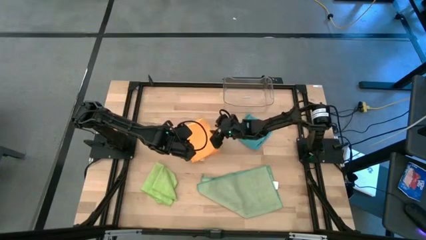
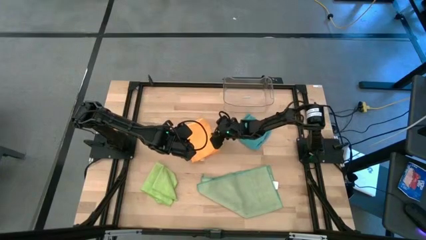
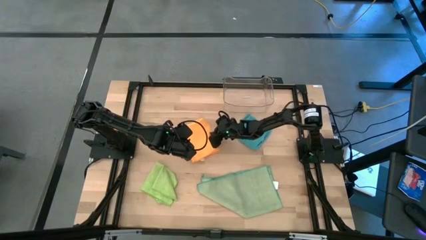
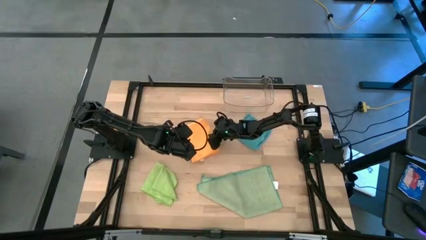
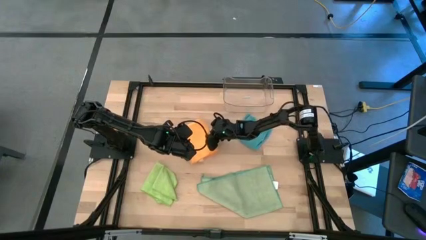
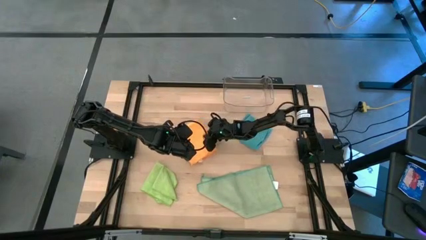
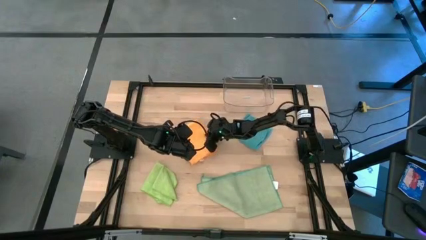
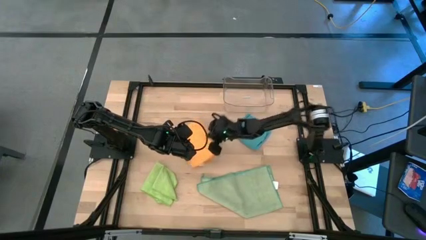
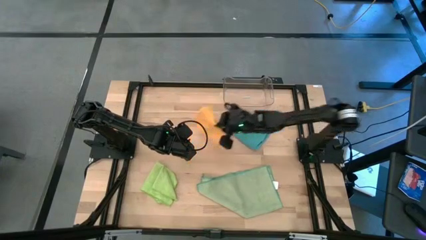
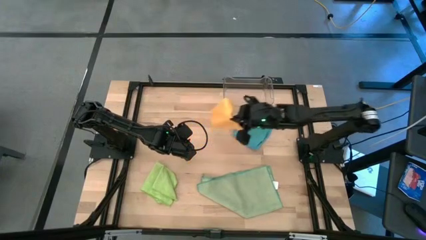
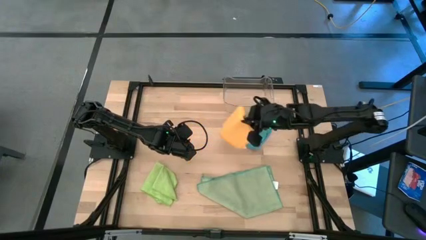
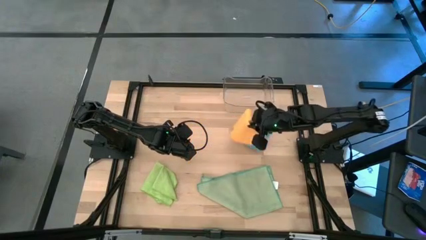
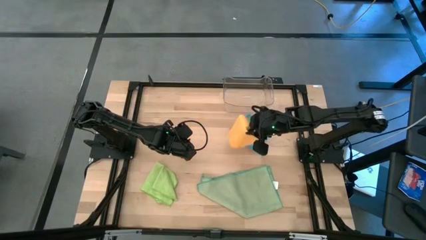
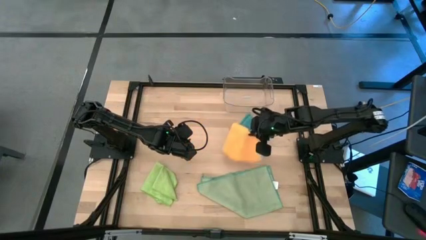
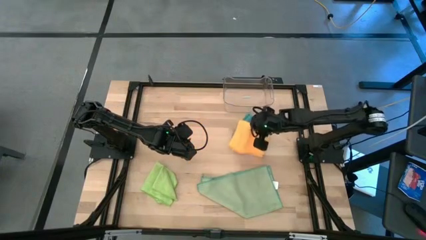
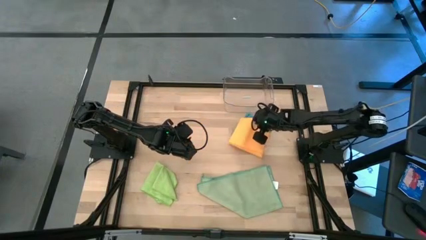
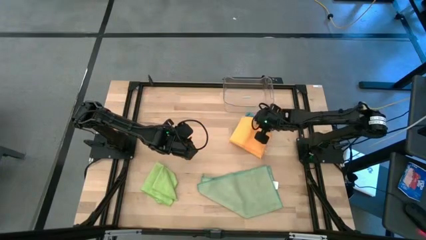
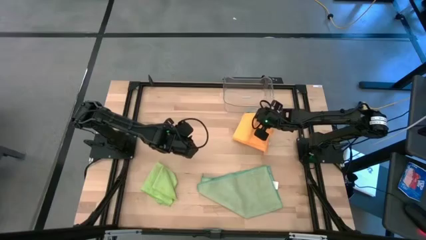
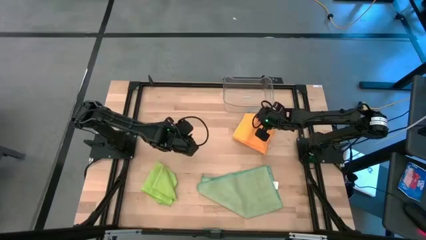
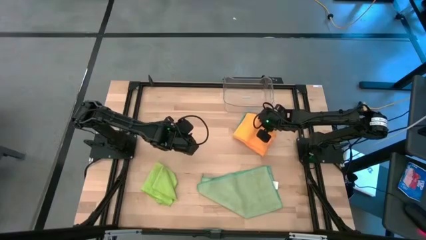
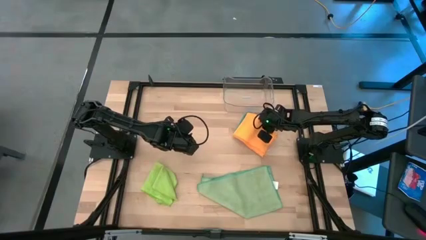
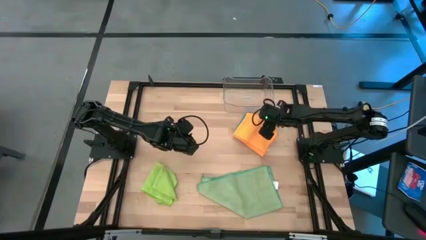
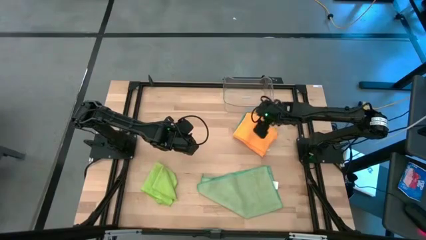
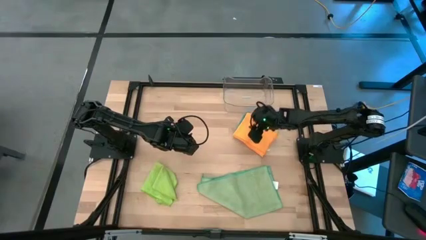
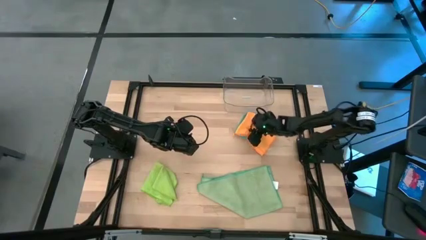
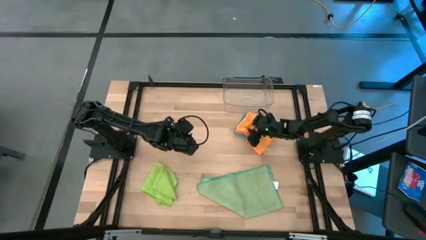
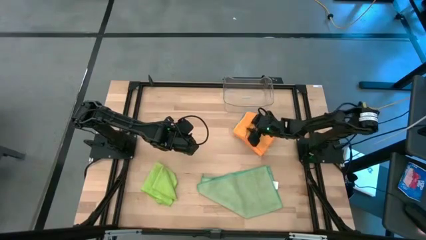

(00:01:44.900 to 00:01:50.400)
Task: Fold microfiber towels
Stack the folded orange microfiber cloth on top of the folded blue microfiber cloth

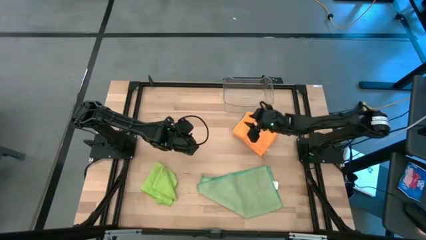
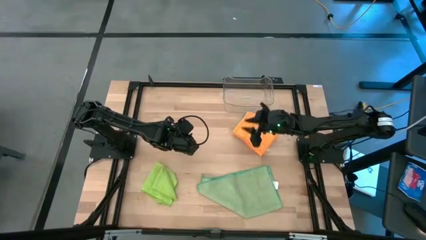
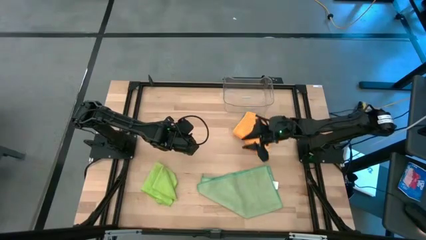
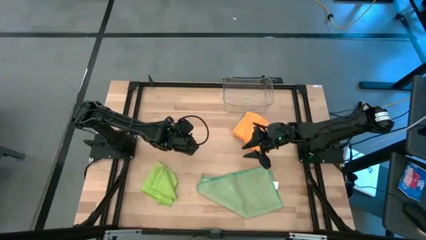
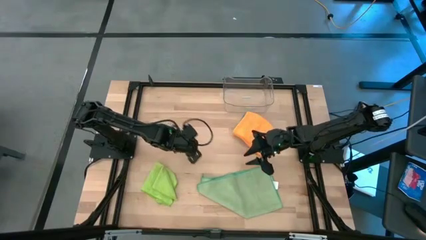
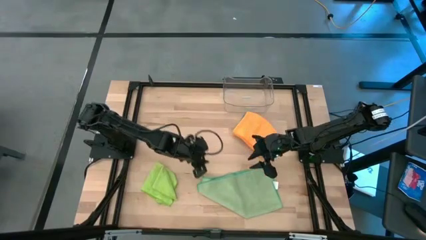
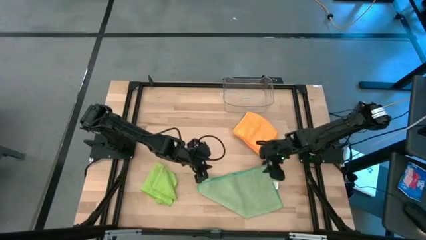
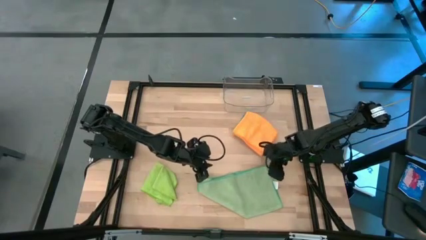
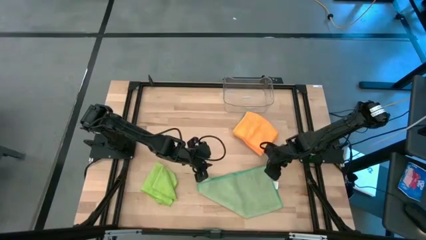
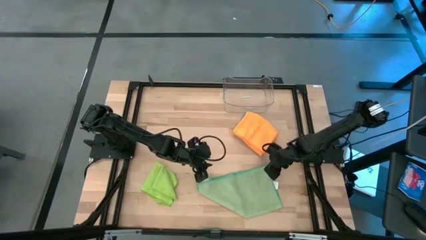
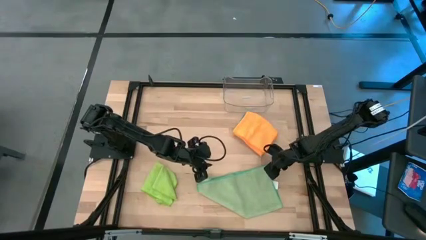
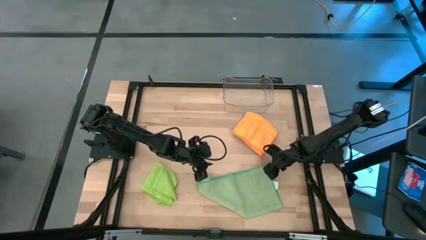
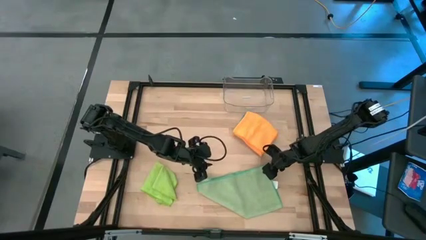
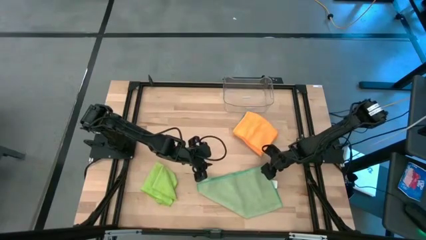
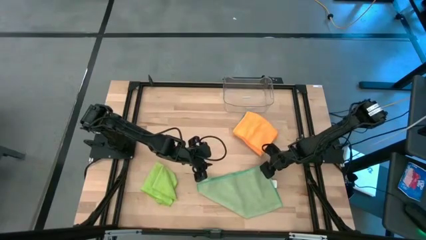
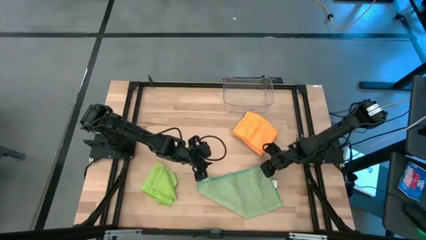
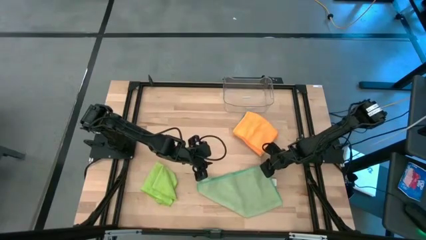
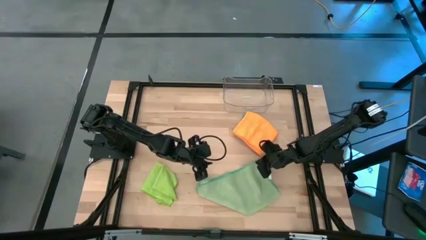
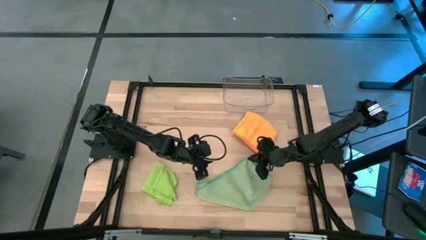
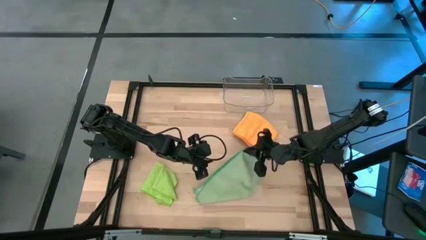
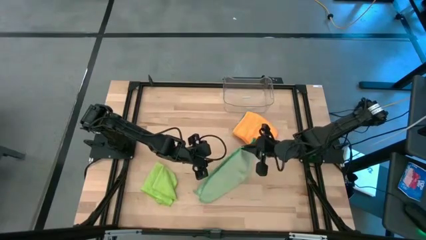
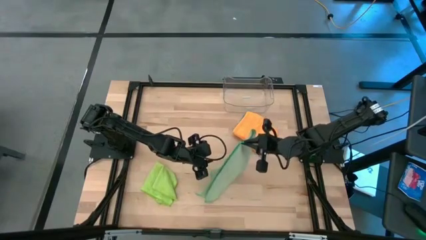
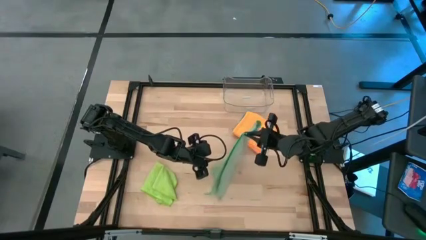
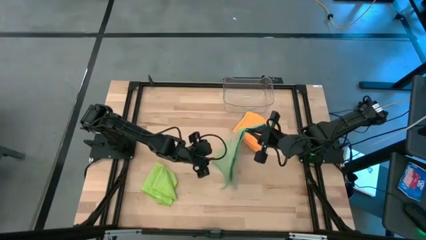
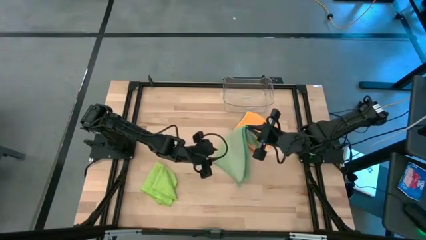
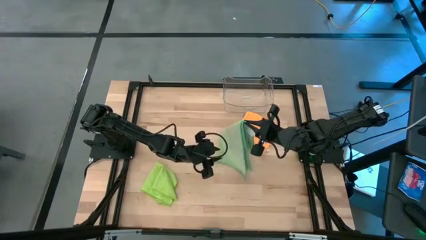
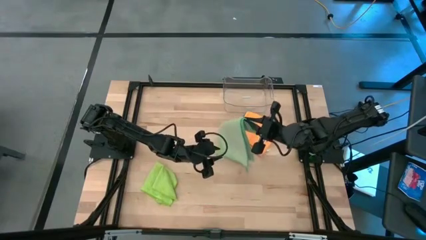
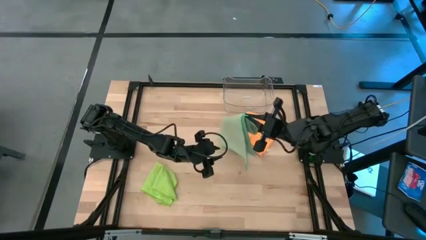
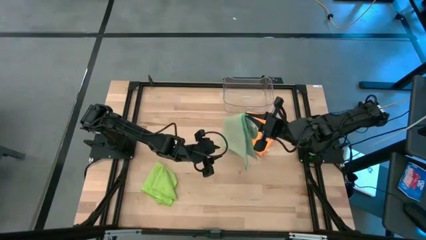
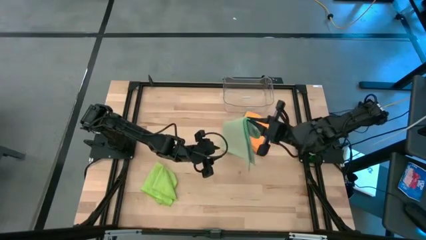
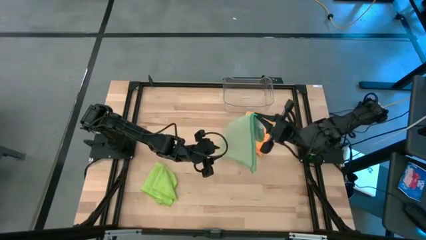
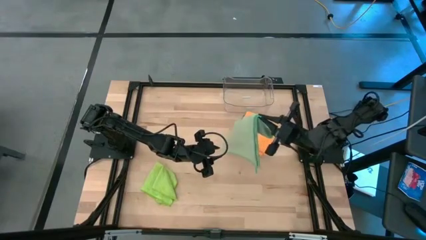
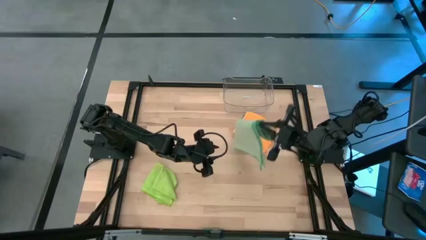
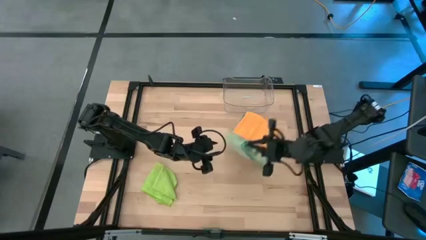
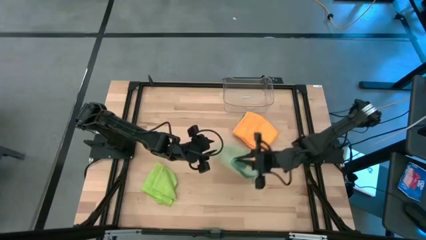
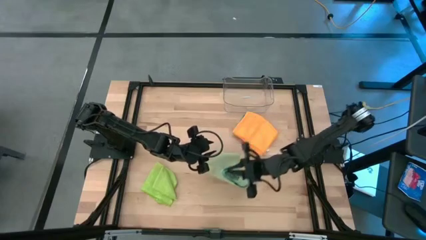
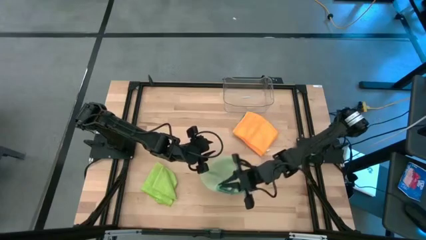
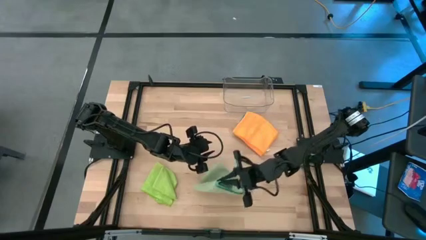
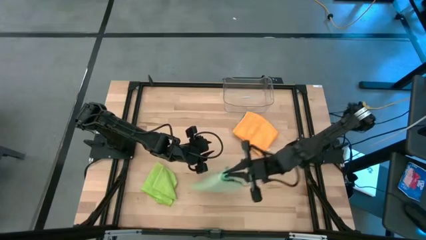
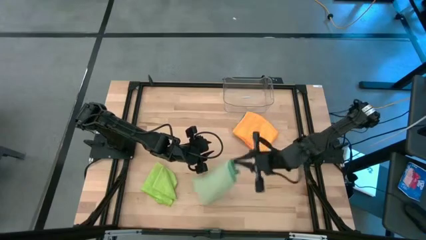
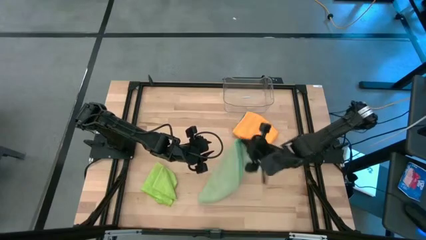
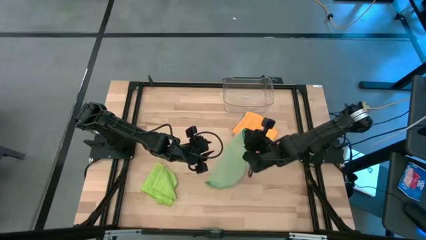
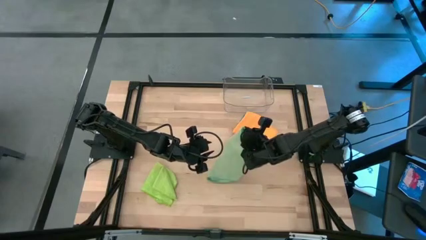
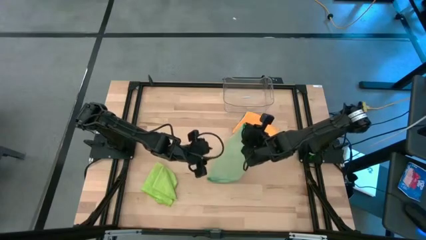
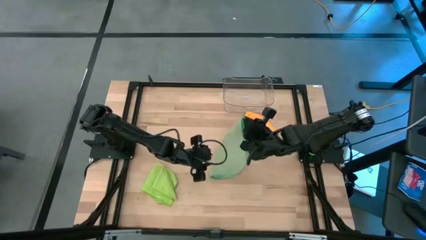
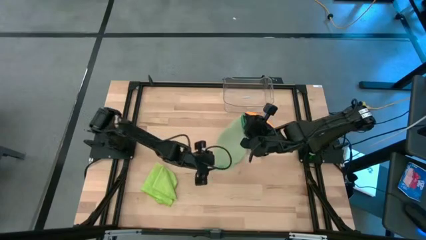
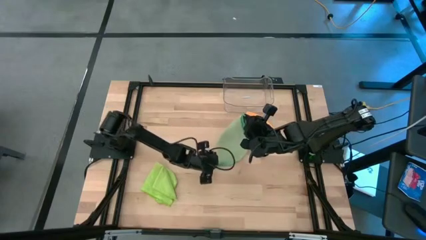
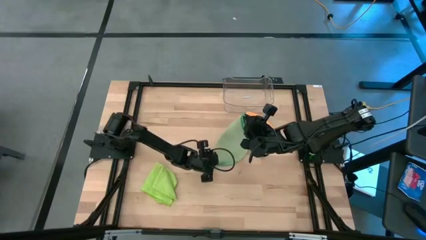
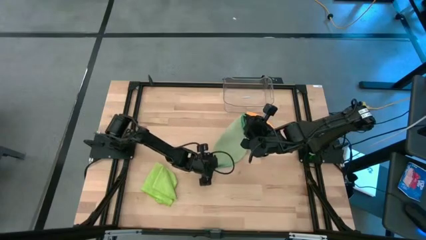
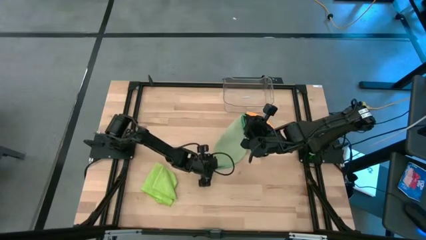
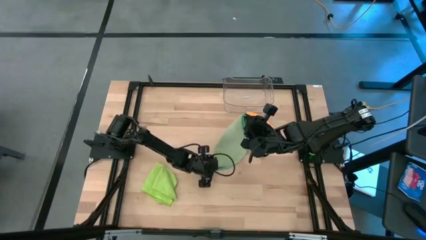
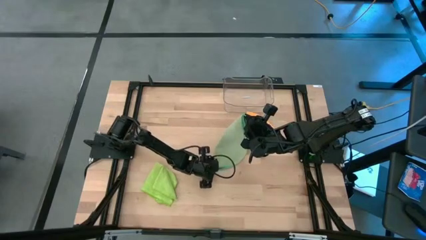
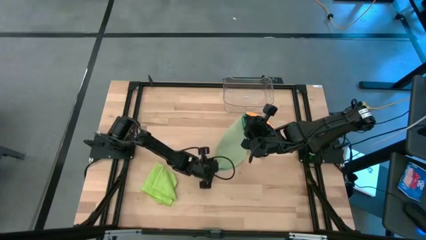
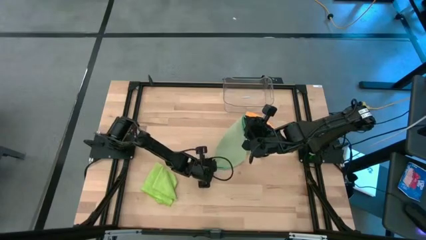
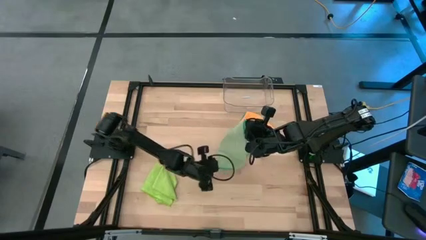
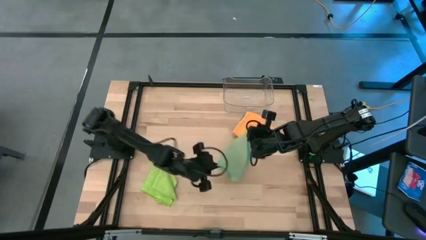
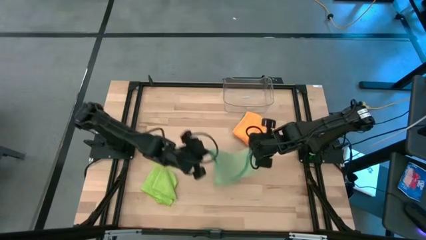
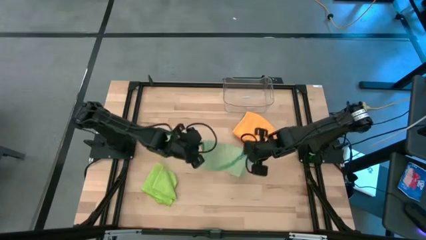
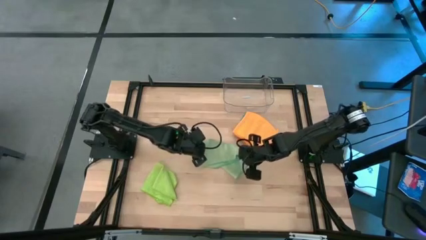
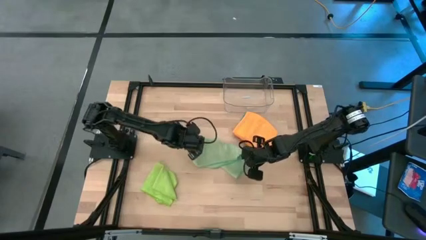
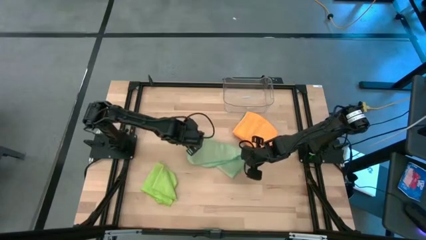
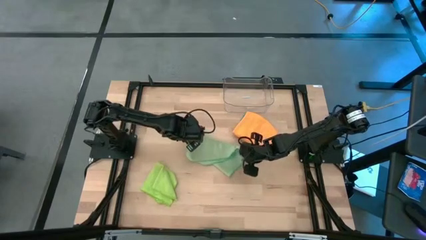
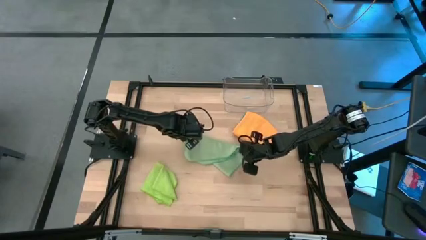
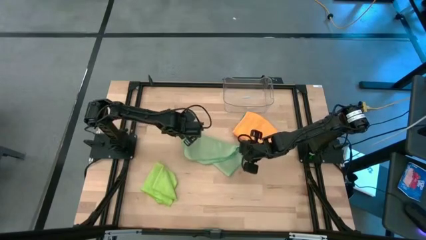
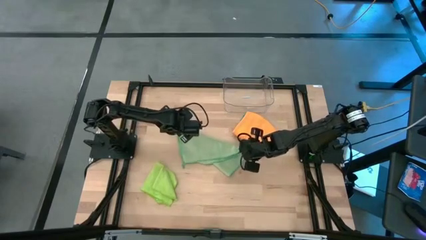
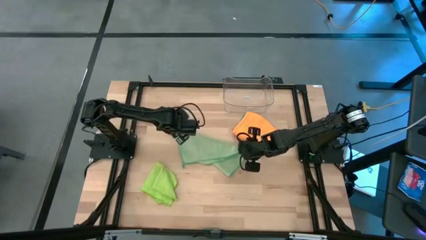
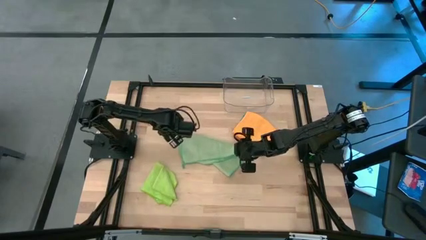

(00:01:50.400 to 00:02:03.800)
Fold the light green microfiber cloth
